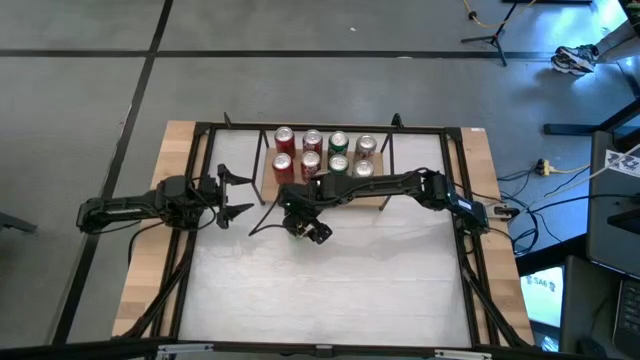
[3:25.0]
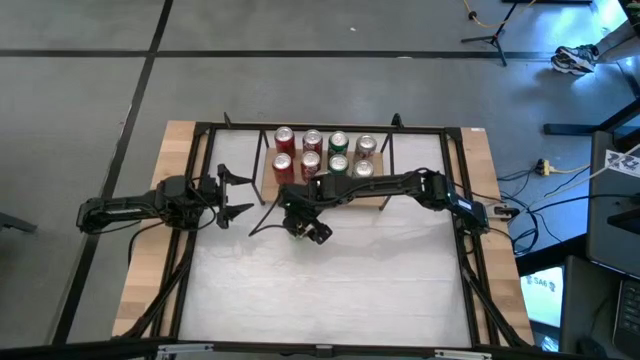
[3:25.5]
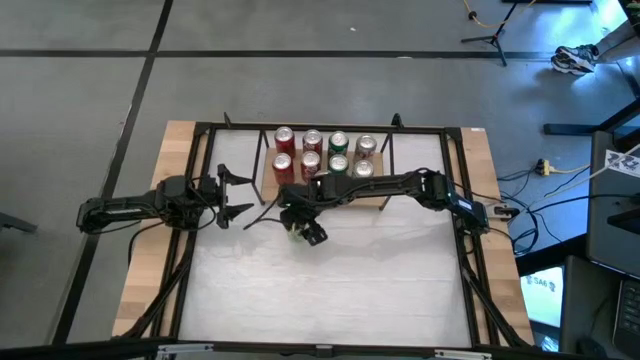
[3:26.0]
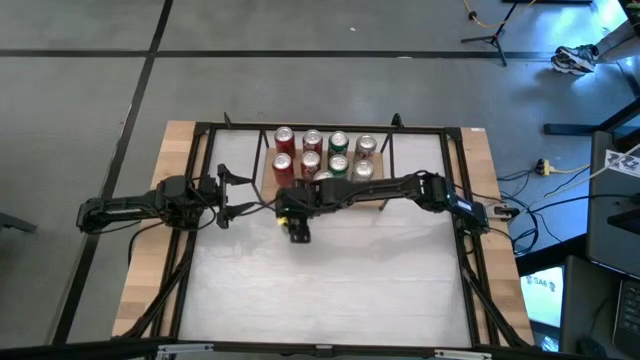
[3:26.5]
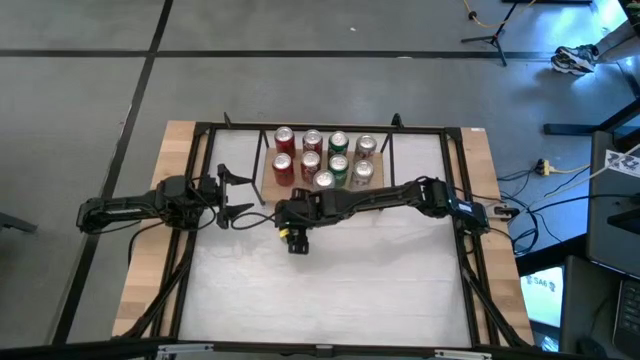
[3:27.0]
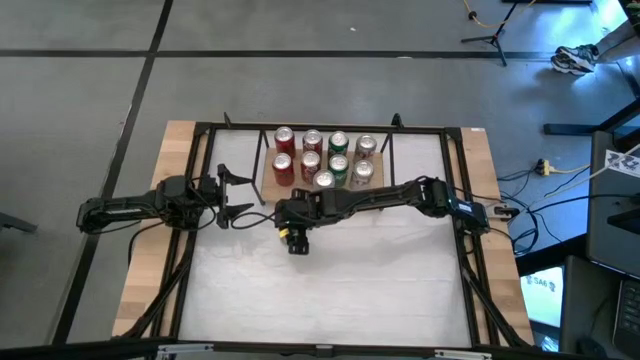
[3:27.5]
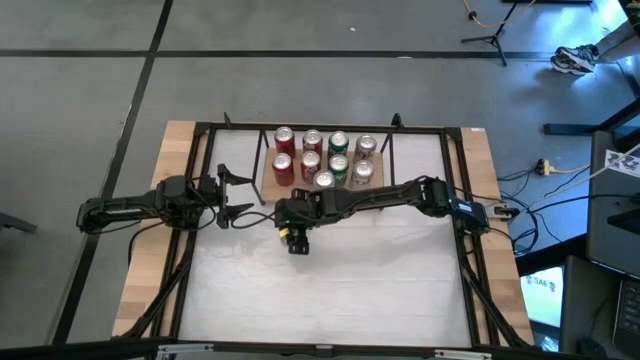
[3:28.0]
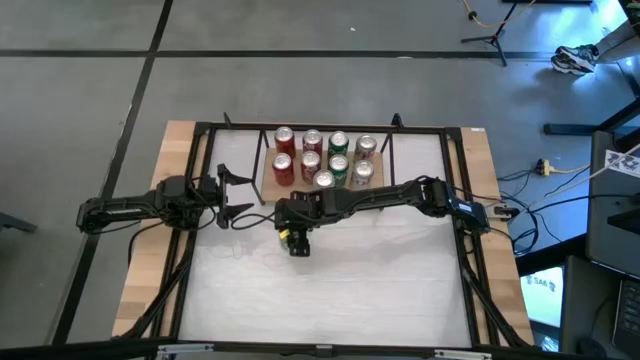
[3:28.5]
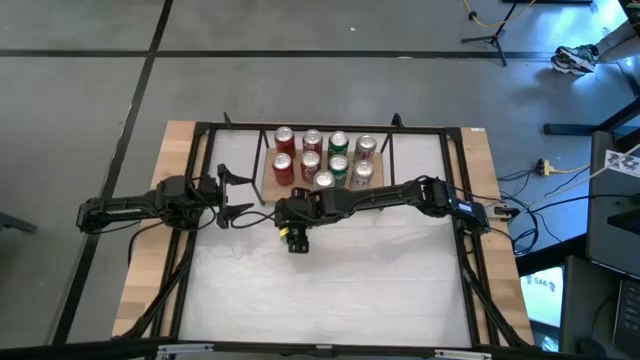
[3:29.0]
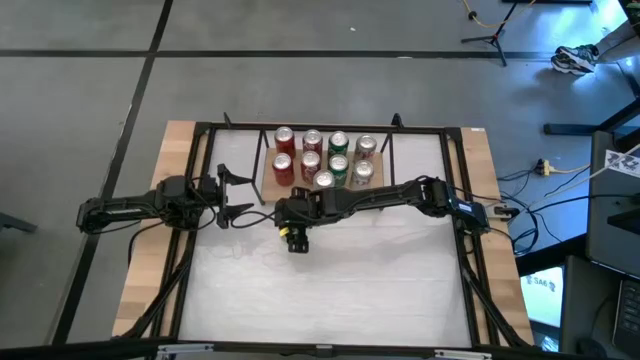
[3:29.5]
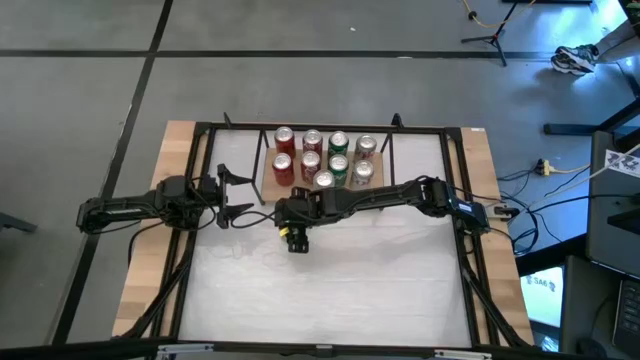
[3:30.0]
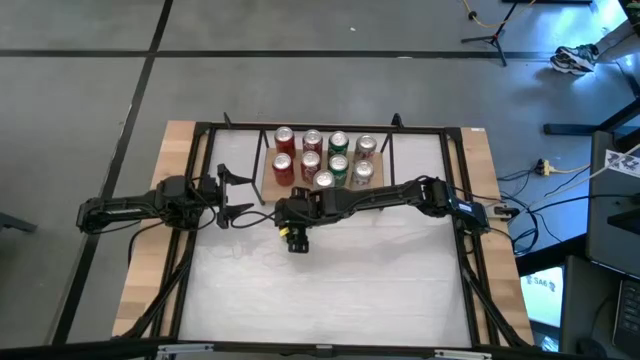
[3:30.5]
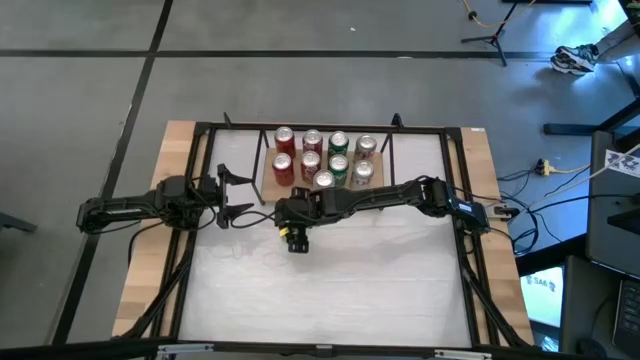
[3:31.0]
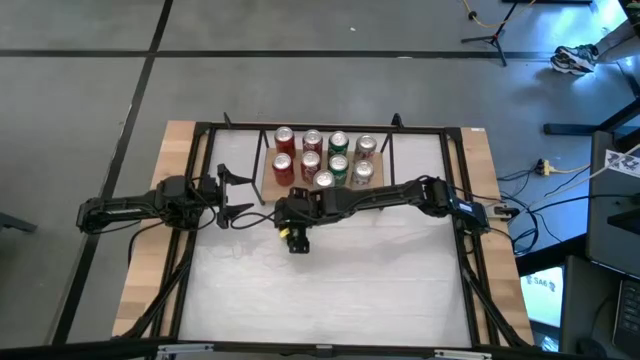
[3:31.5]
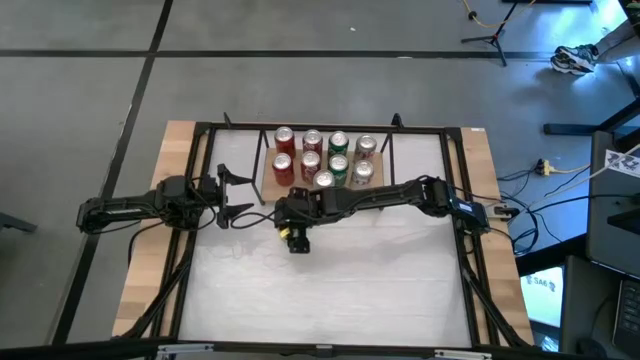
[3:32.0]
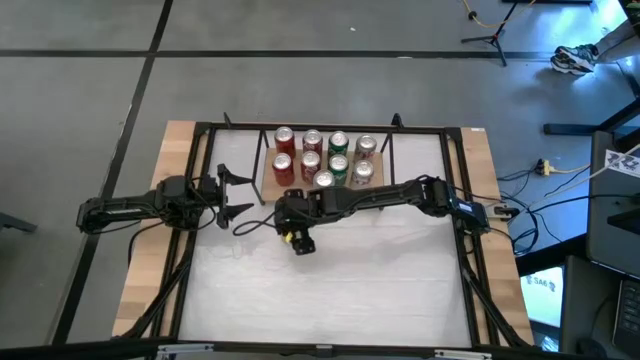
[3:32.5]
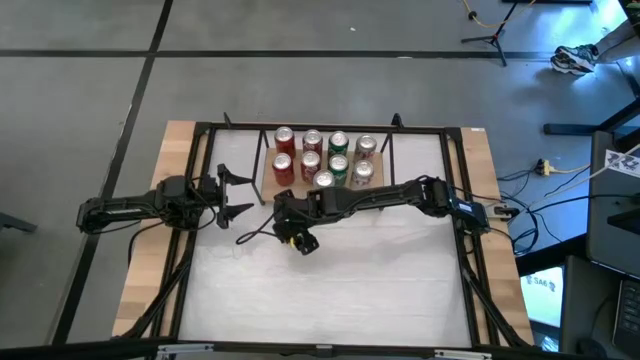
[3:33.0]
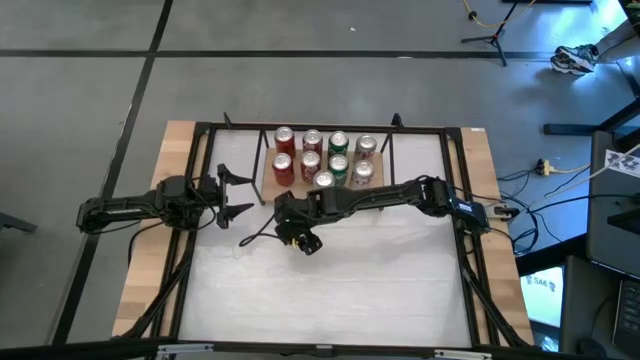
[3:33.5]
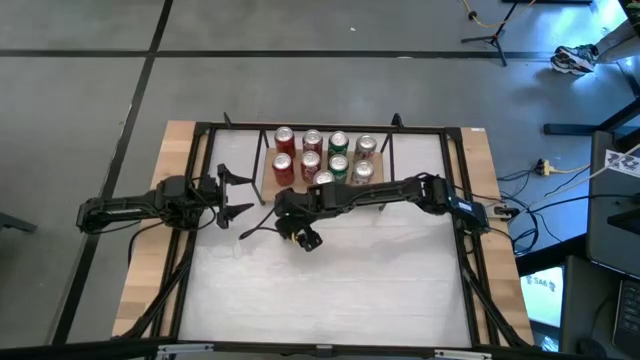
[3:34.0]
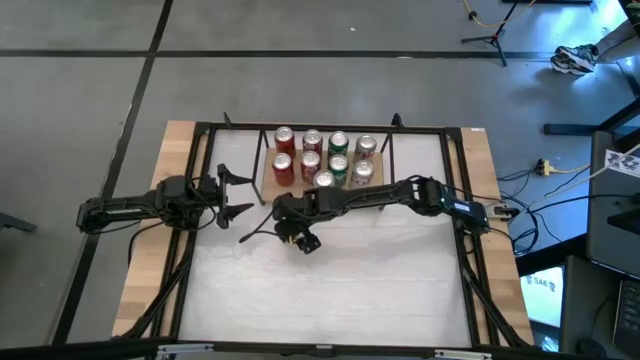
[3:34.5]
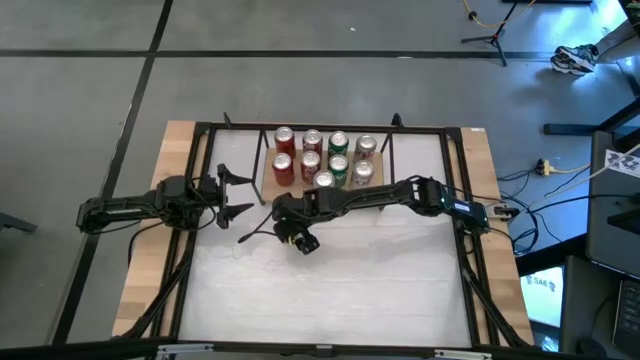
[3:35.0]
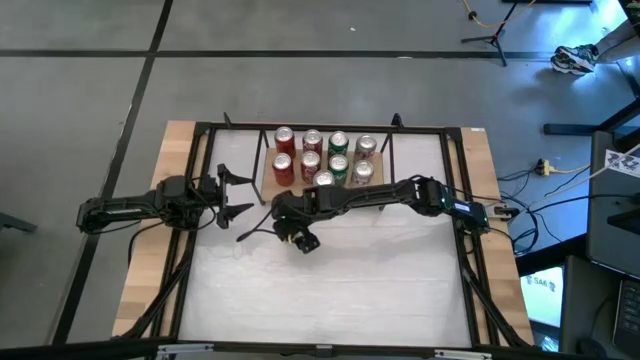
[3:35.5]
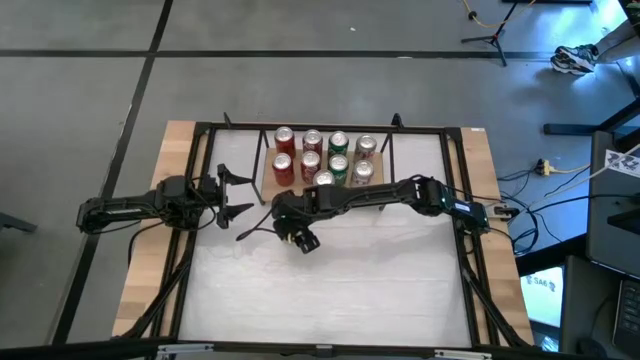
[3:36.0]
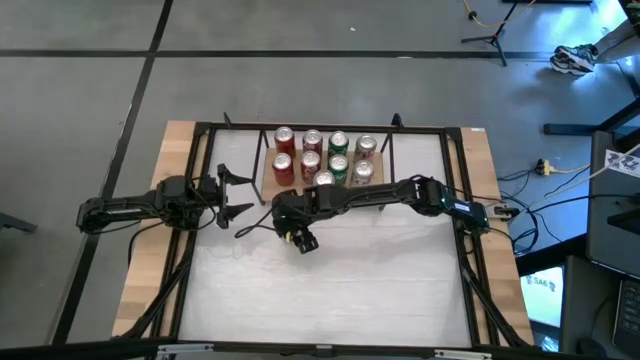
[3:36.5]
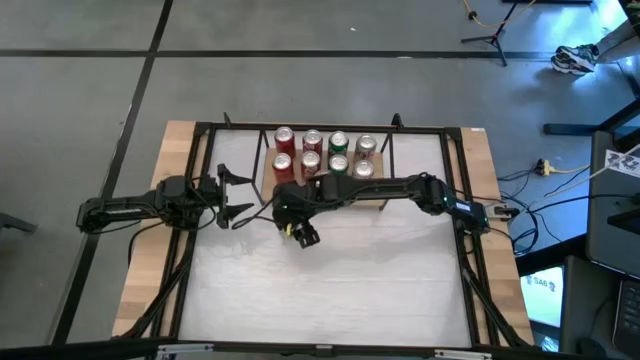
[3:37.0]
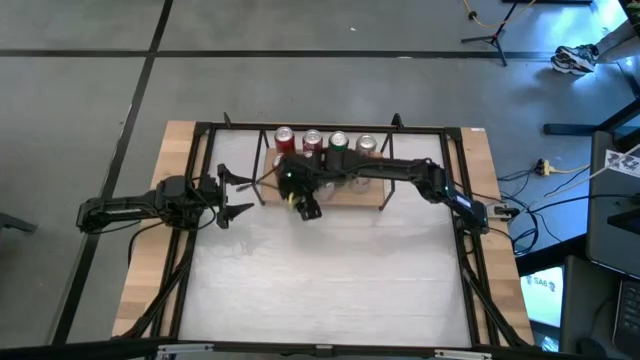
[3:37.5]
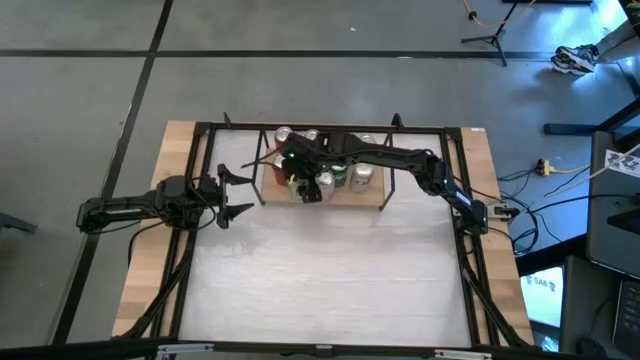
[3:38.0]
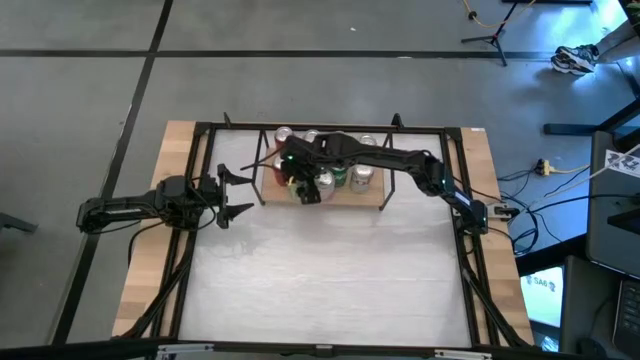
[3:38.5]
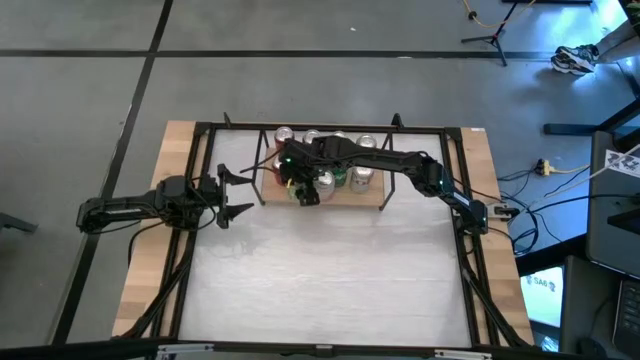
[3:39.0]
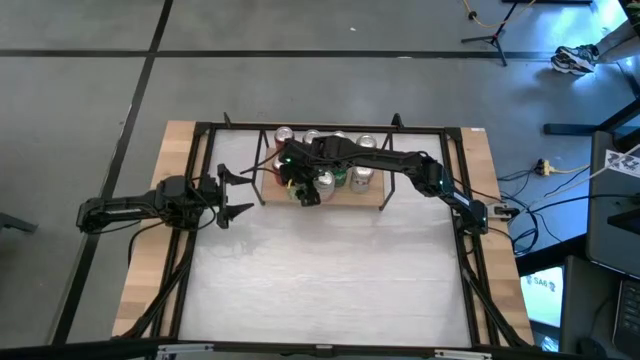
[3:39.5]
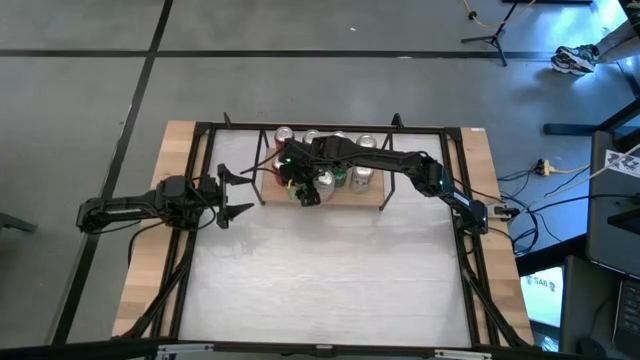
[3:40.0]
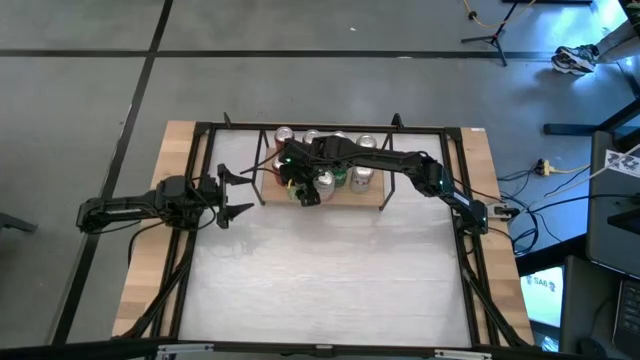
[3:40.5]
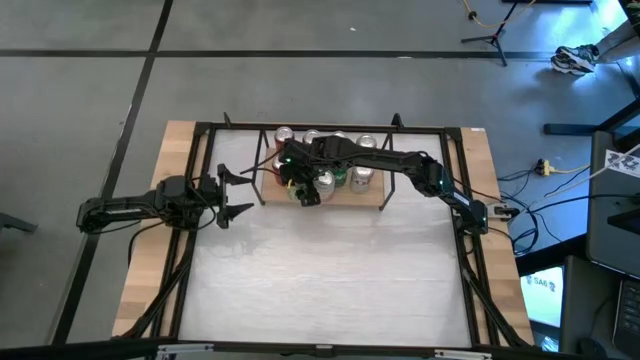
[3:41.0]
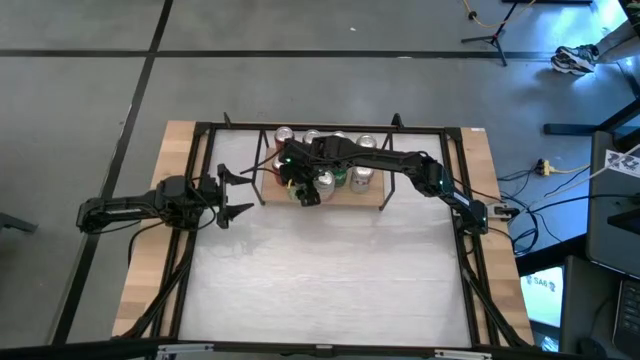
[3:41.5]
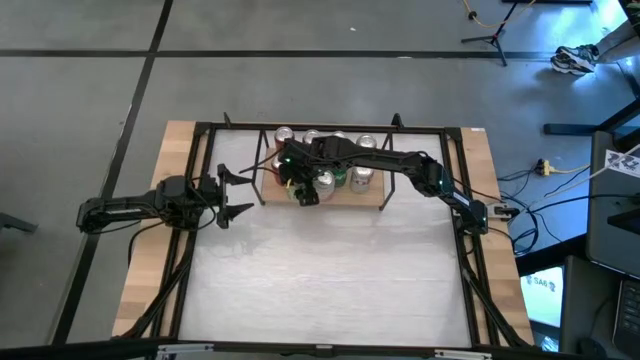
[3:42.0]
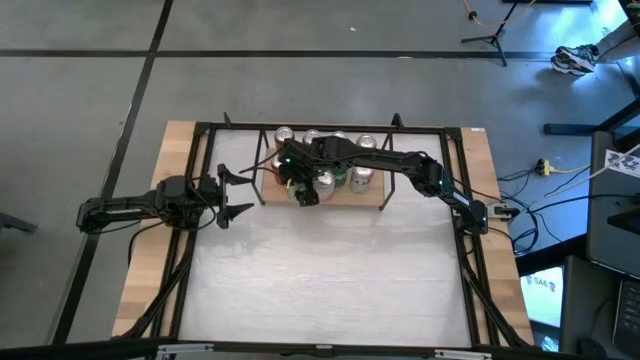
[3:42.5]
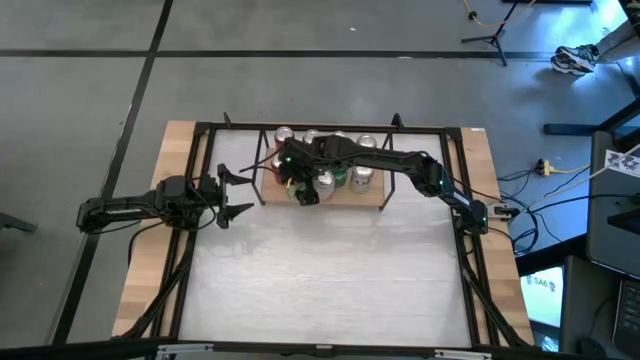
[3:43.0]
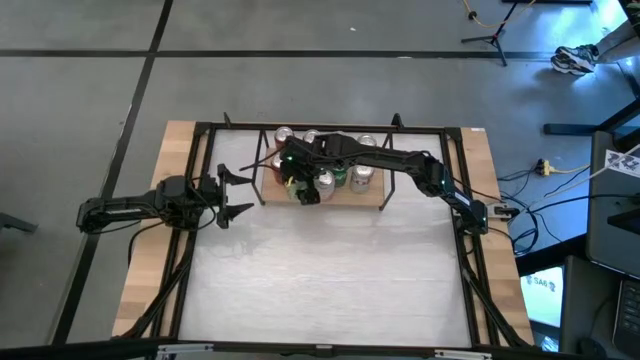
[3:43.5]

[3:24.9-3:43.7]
Task: Place canned beverage on shelf
Put the light green soda can on the shelf
